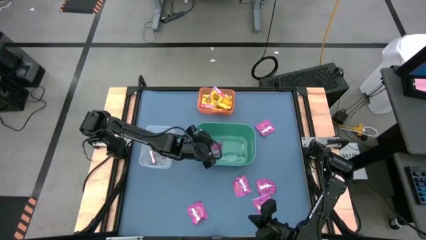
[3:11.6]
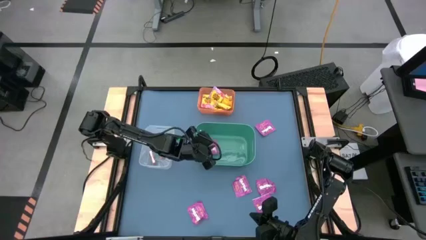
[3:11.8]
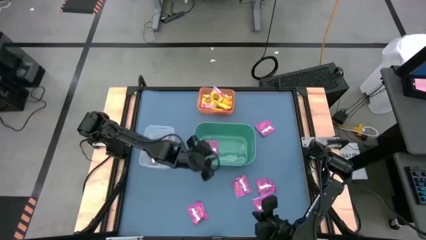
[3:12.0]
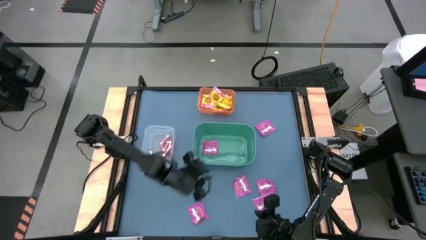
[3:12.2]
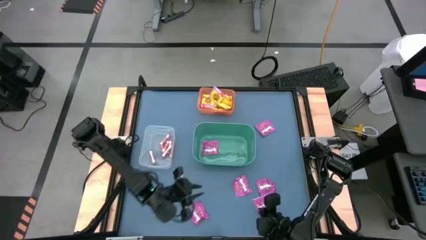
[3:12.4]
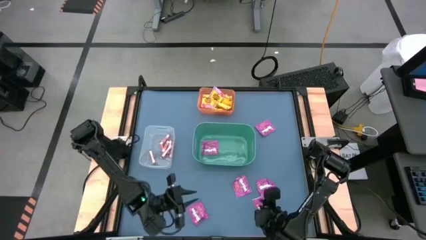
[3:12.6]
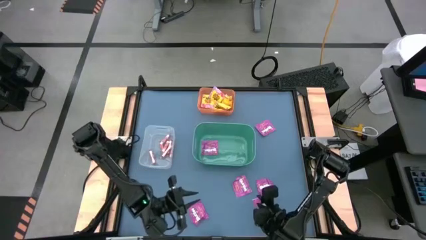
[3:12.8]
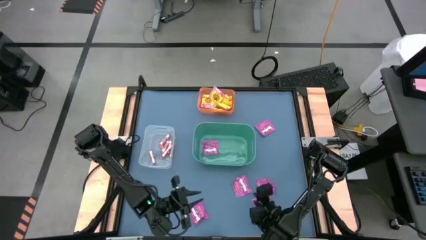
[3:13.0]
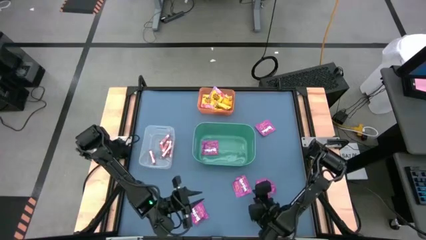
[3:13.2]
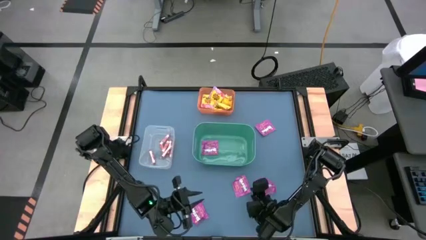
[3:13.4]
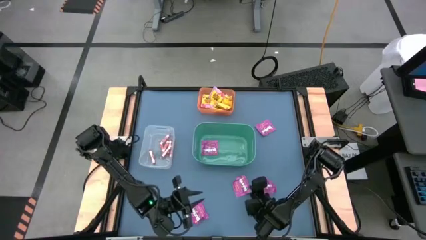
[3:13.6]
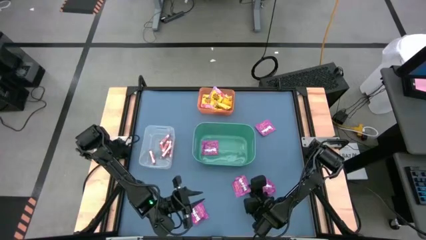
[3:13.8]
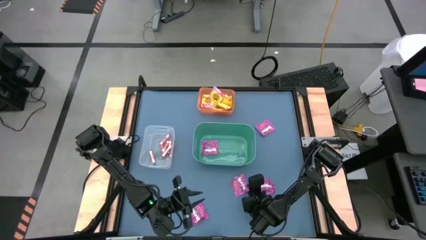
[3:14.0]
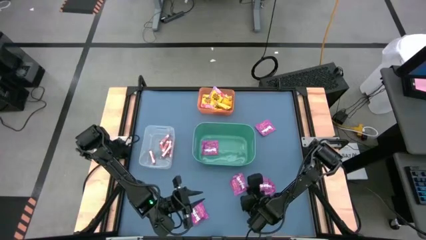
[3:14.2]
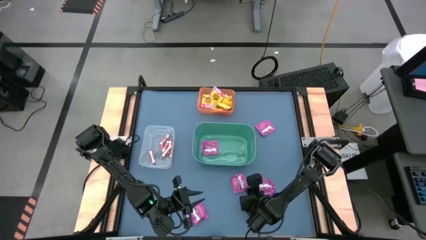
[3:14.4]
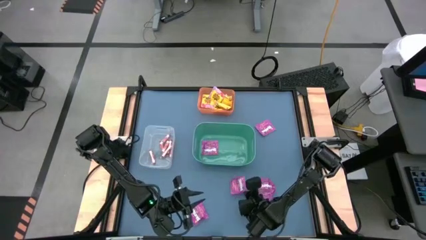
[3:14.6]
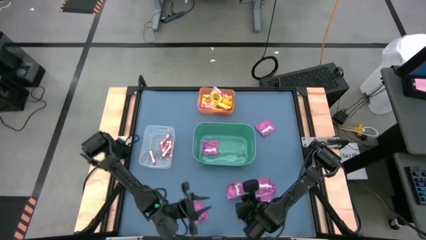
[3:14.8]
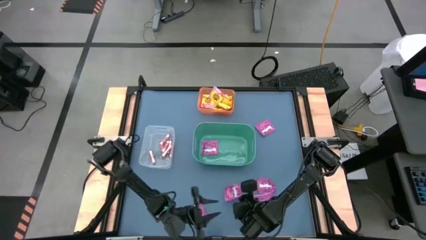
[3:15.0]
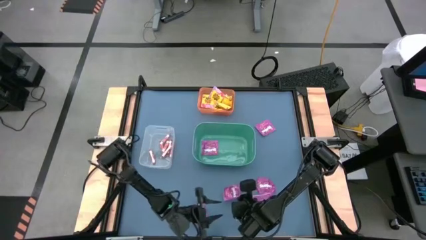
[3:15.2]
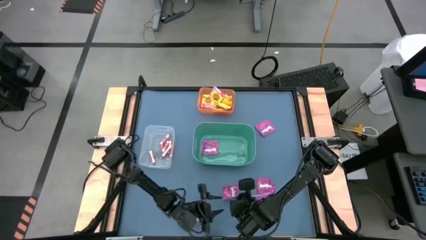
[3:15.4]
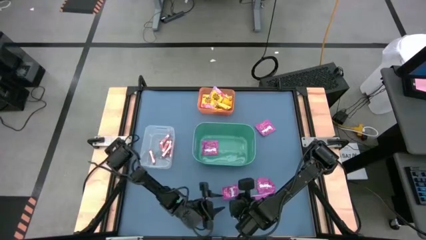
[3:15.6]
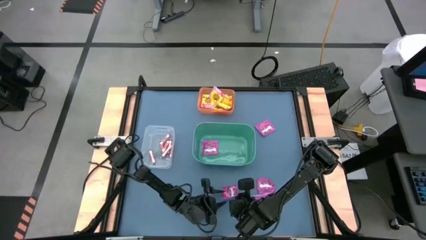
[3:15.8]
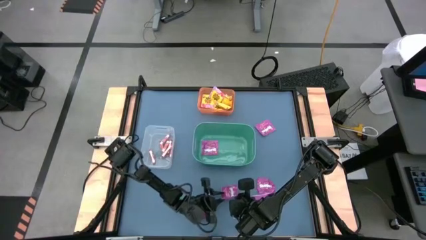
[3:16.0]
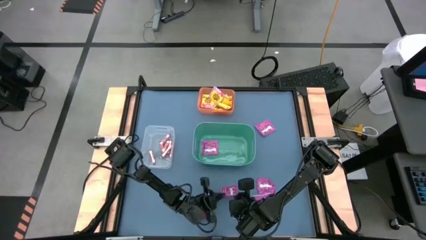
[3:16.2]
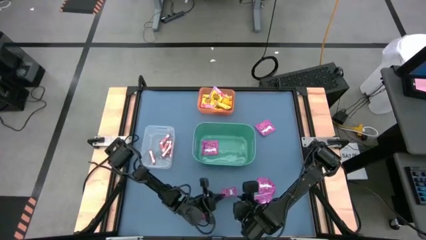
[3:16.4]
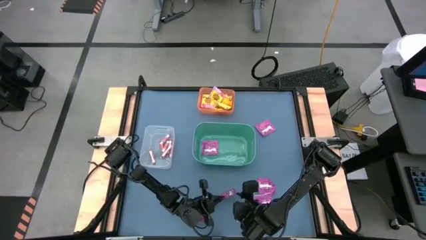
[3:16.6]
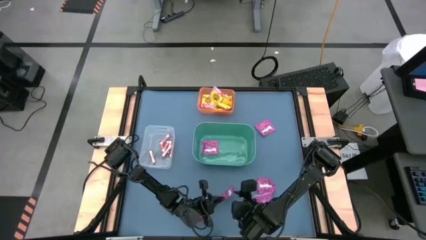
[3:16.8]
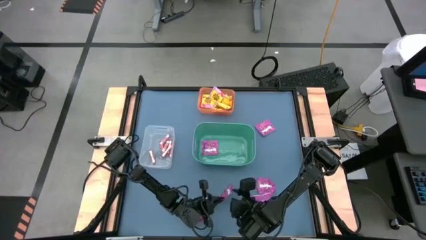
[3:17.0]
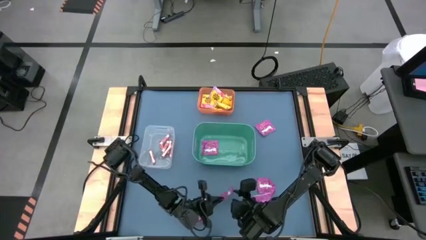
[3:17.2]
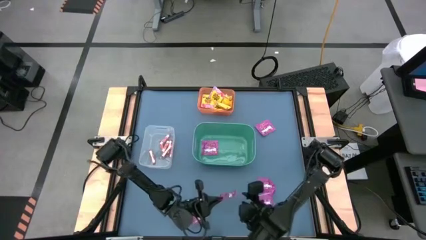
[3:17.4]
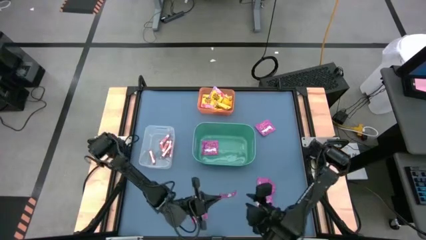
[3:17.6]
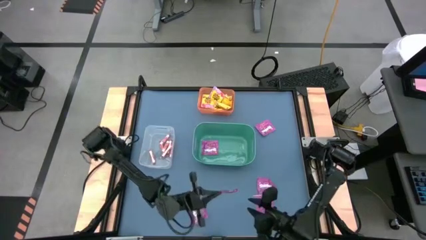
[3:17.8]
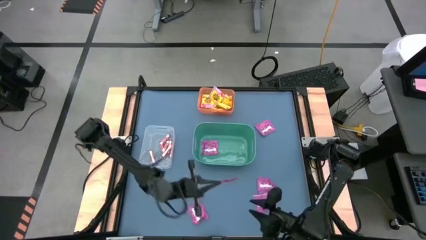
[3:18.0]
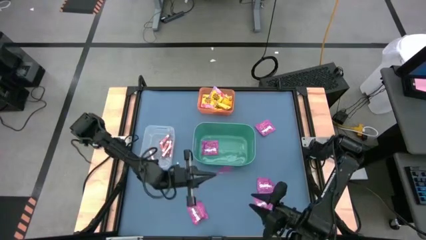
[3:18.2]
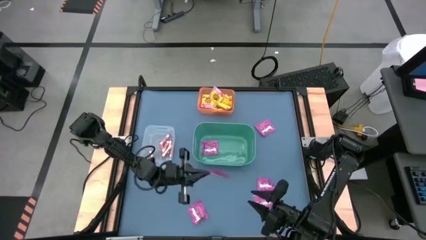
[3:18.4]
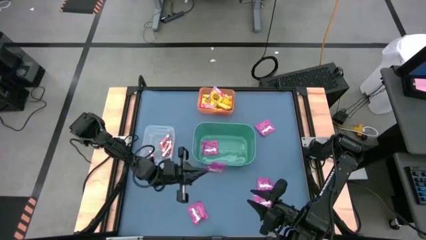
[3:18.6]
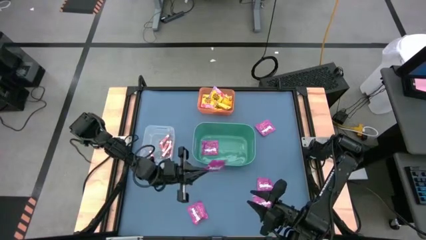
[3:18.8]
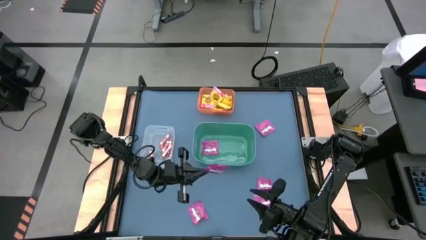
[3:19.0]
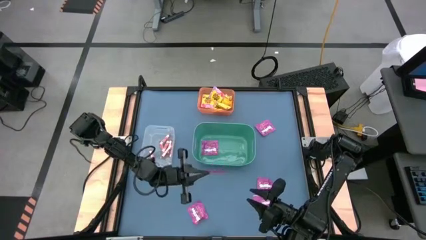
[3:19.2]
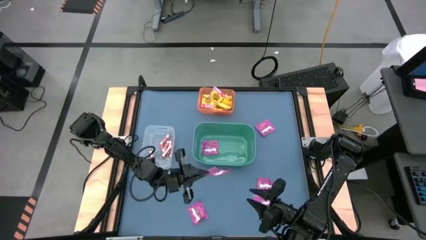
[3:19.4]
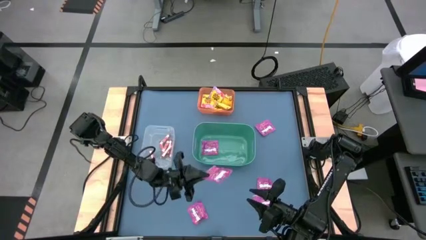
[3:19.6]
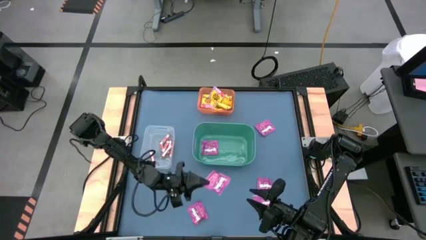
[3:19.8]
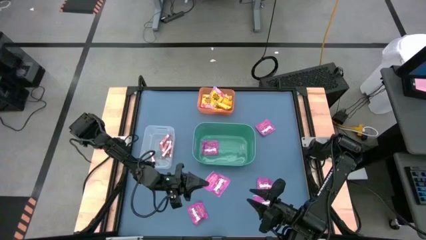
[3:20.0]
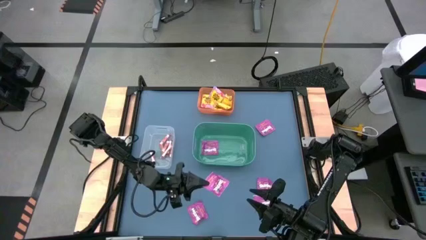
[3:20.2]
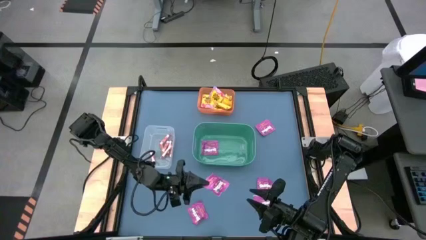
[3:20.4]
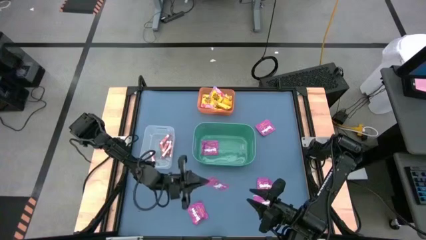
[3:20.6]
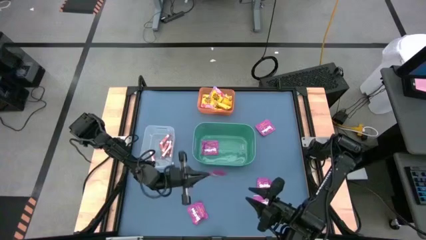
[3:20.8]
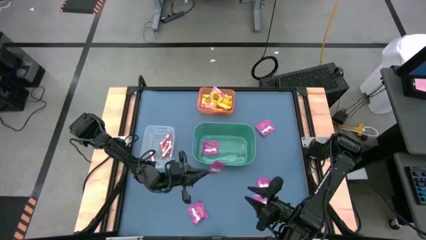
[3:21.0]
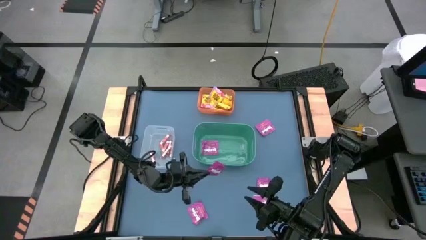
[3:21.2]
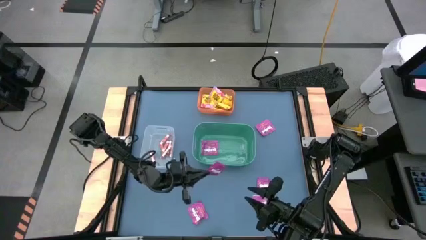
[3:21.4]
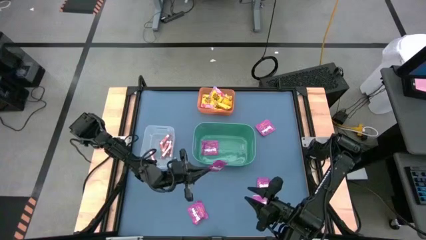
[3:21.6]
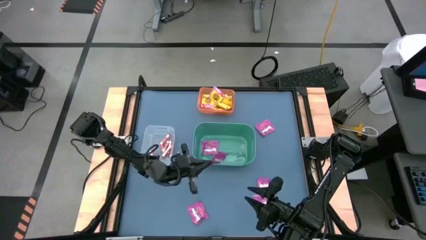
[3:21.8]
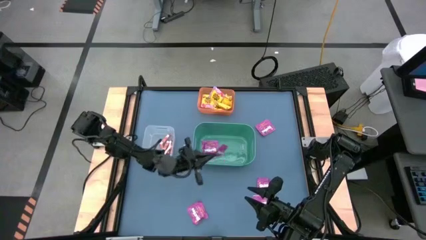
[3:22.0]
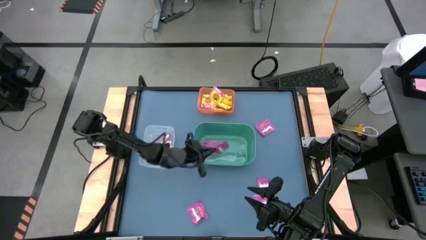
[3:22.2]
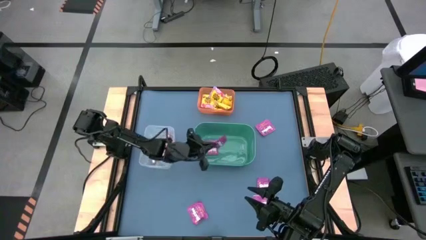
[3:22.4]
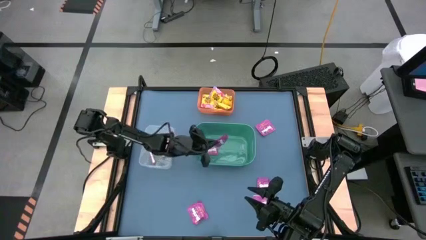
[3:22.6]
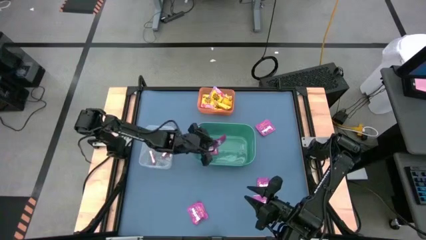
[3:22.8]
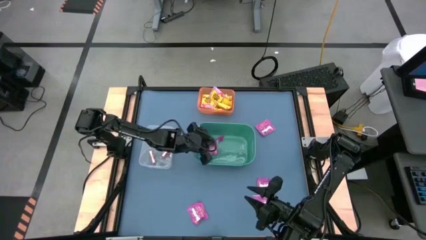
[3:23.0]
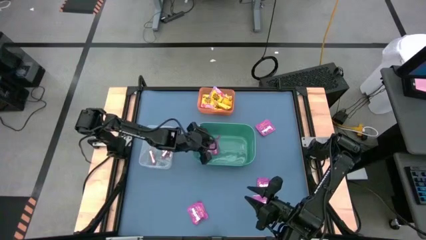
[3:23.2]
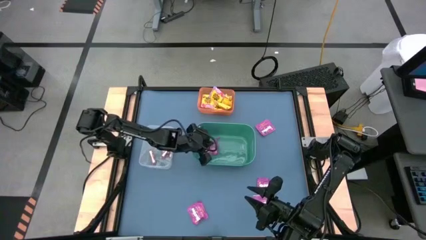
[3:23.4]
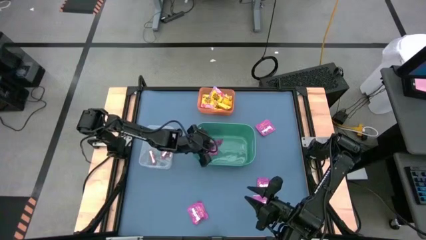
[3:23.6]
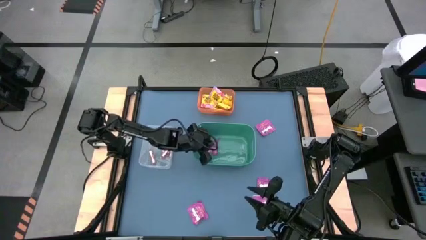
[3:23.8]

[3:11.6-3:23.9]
Task: Sort candy
Put the purple candy into the green bin

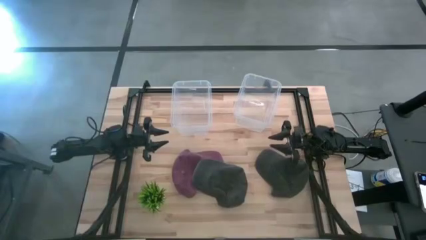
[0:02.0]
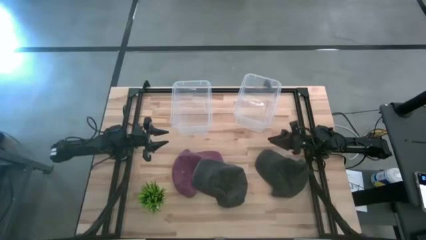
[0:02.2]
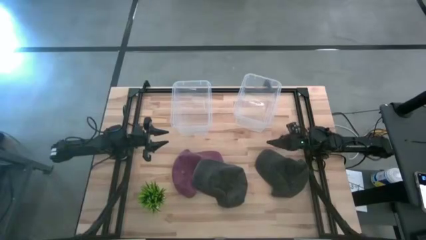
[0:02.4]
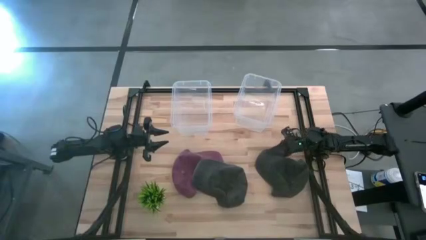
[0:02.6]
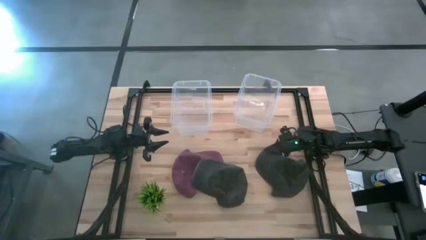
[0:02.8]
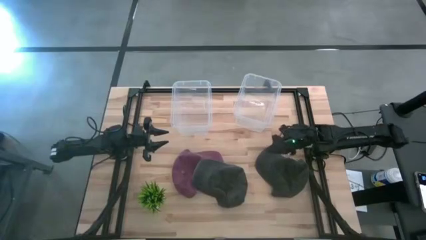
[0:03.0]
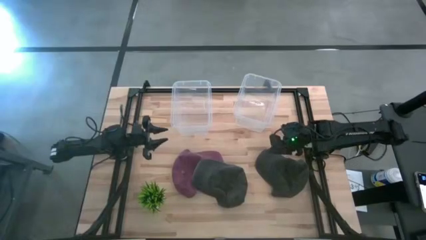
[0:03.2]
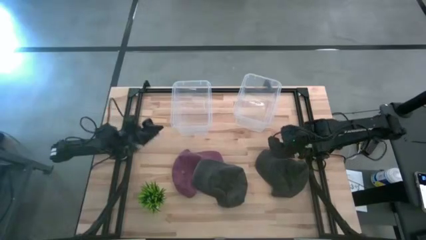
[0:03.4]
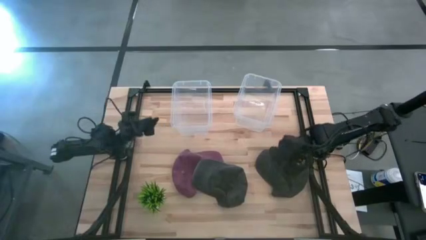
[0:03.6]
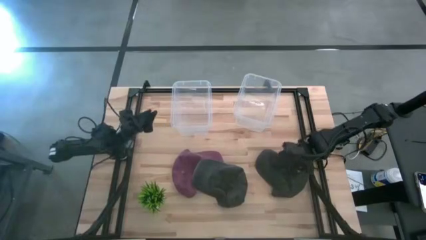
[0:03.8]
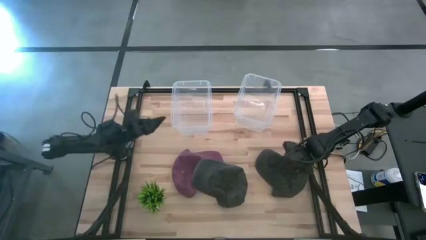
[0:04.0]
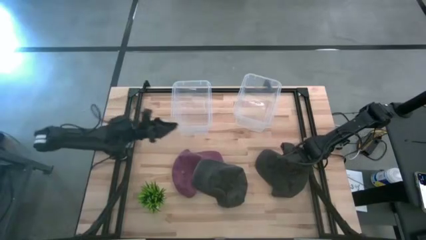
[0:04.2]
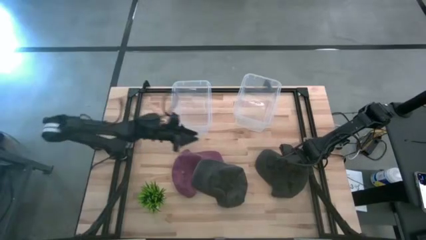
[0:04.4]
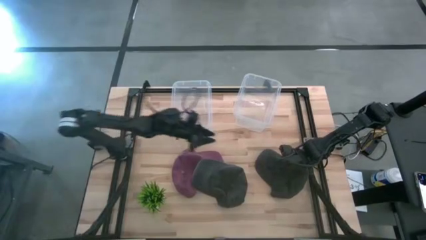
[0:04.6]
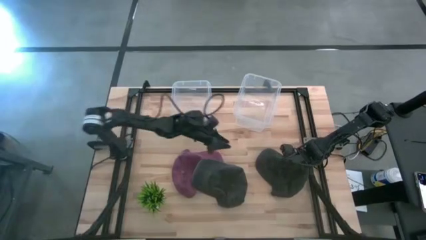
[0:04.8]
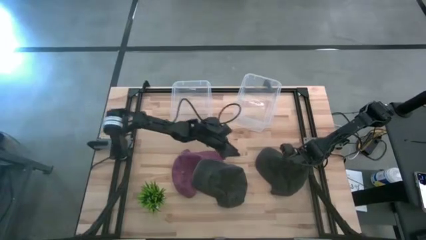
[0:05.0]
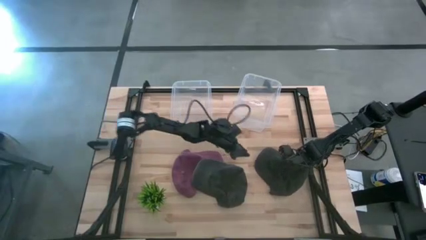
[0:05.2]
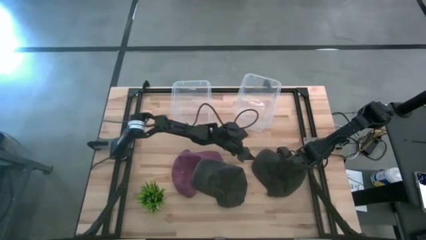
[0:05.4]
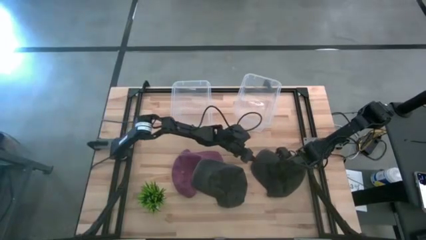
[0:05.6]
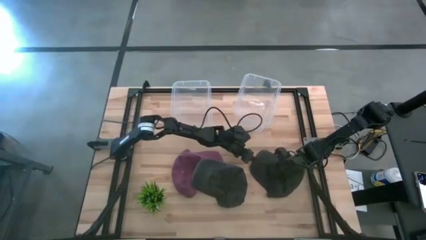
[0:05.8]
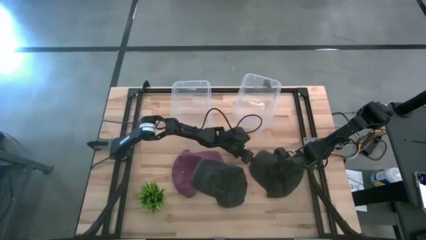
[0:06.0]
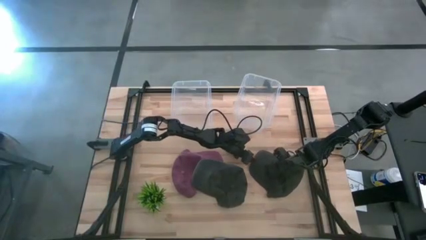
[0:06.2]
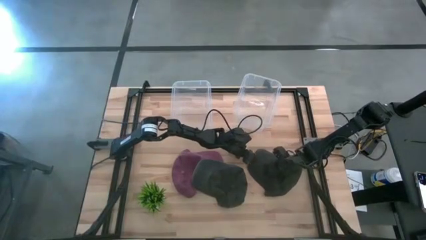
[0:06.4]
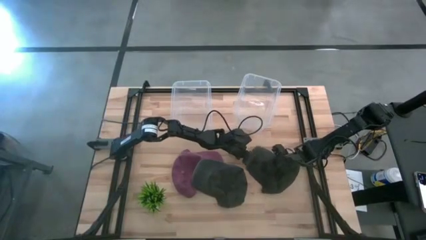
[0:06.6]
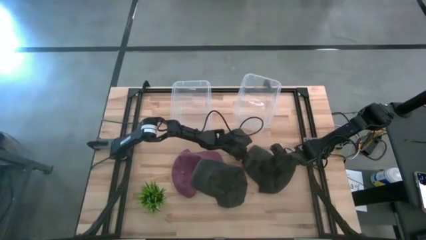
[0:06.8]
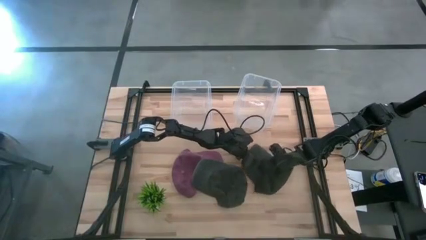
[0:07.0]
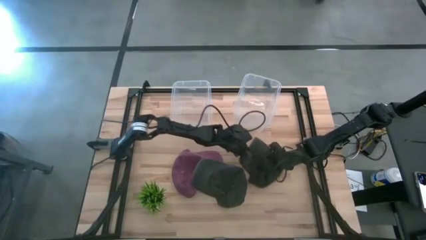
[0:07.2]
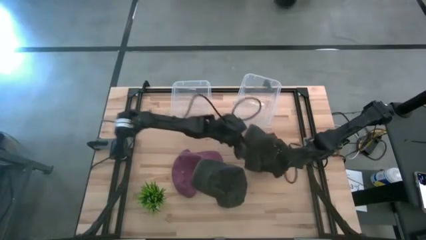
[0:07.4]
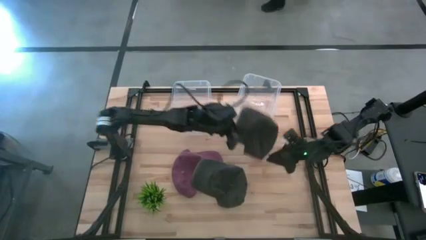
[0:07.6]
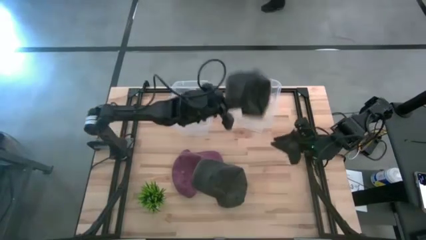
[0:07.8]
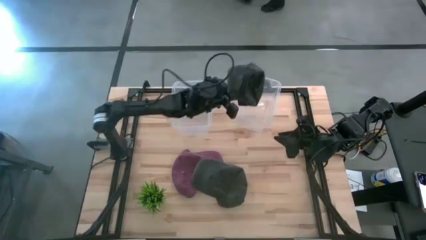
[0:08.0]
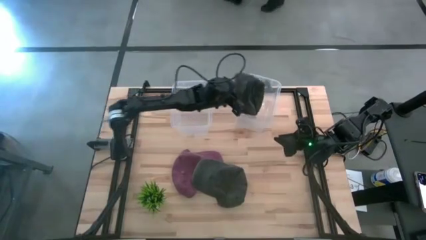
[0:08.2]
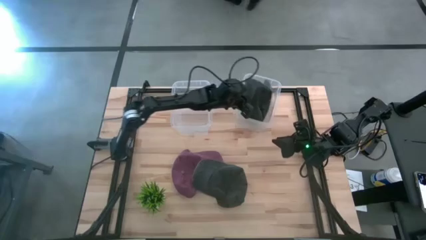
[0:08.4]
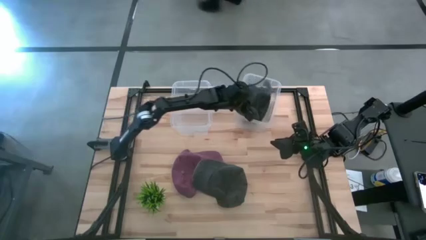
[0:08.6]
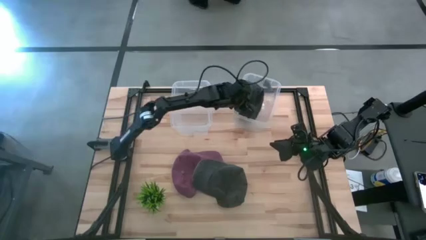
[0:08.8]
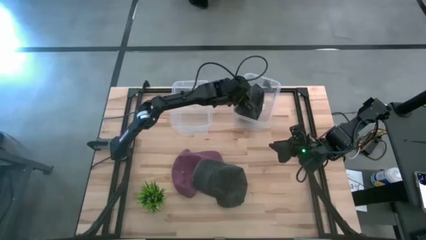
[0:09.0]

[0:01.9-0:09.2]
Task: Pick and place caps into container
Put the dark gray cap into the right transparent container
